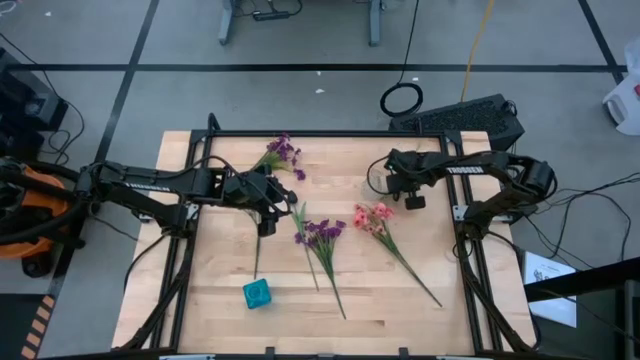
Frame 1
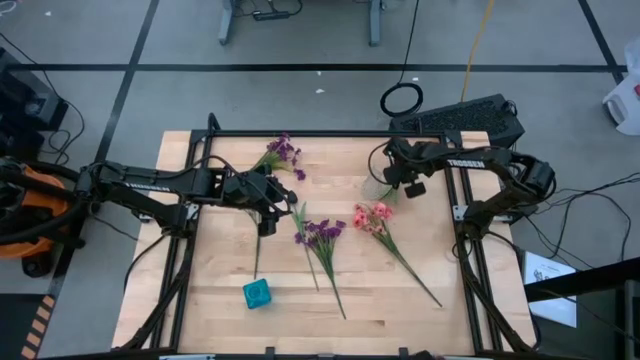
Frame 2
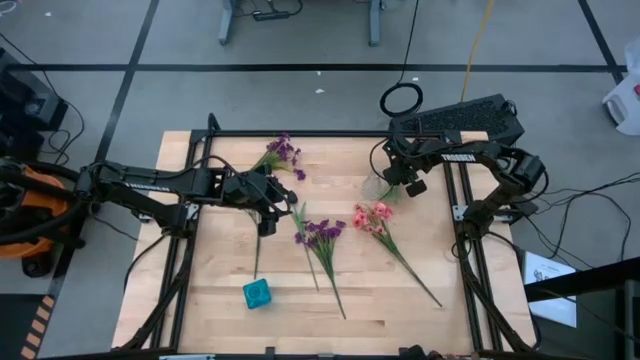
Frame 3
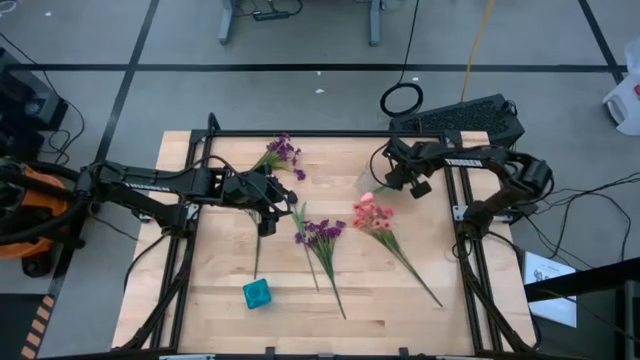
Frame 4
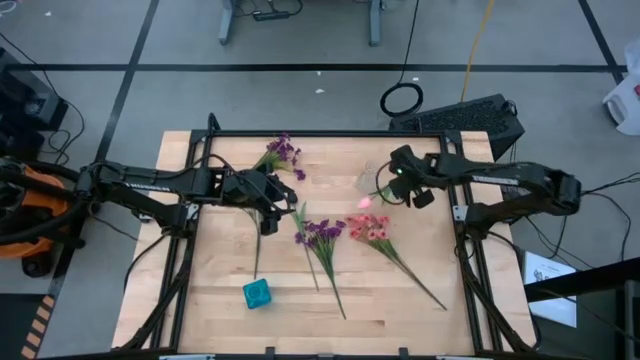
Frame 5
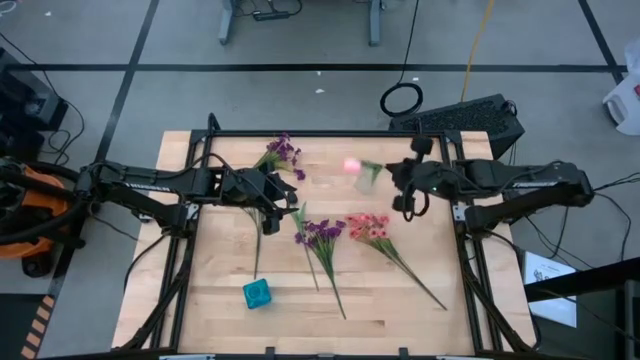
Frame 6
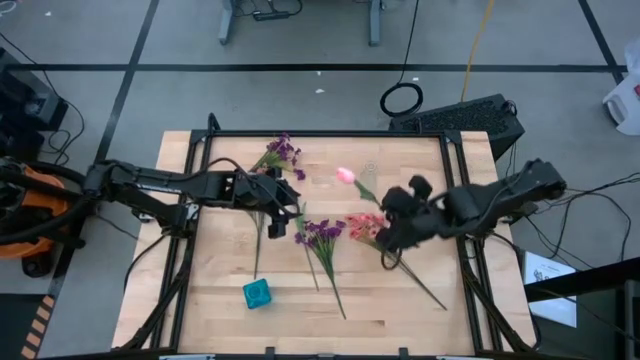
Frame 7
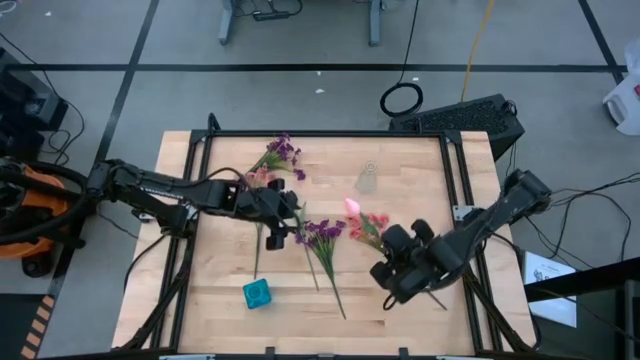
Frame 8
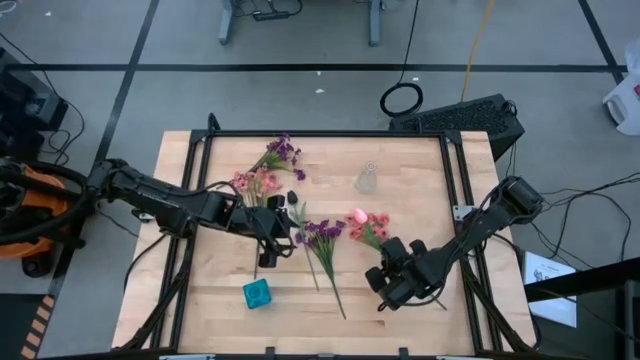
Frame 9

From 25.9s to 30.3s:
Task: Sort flowers into vase by color
Move the pink tulip to the middle right of the table

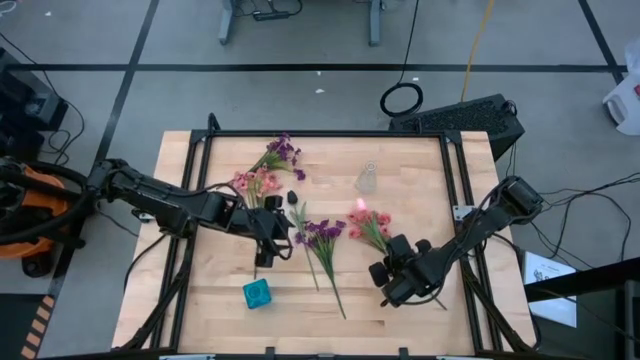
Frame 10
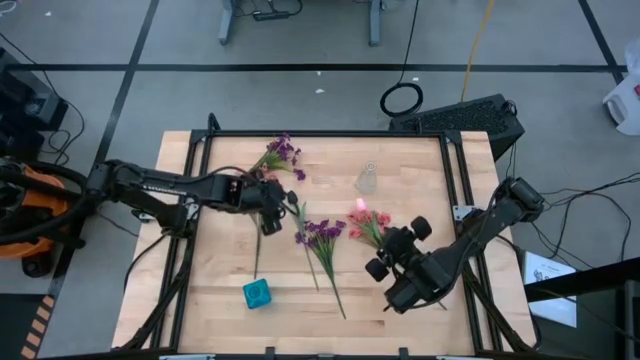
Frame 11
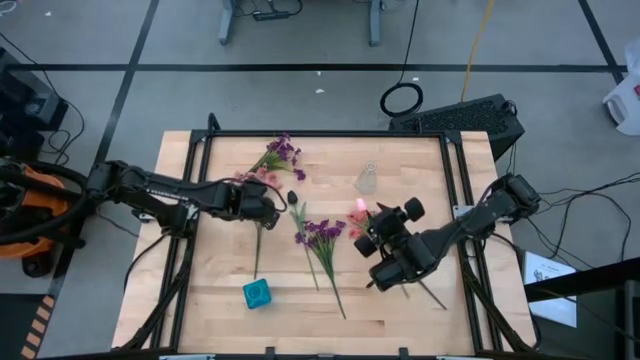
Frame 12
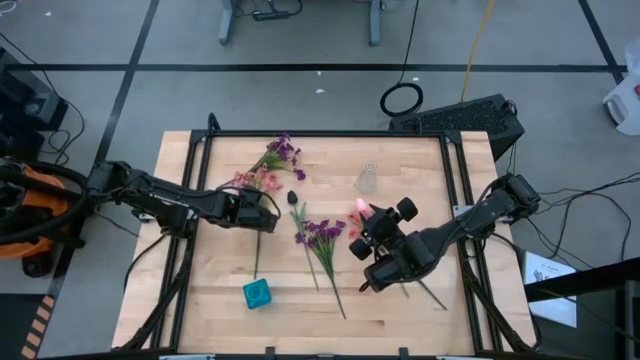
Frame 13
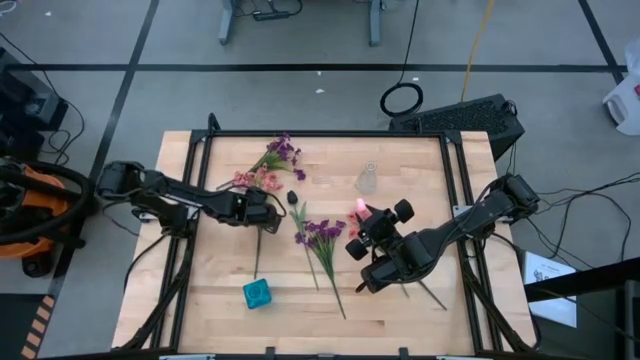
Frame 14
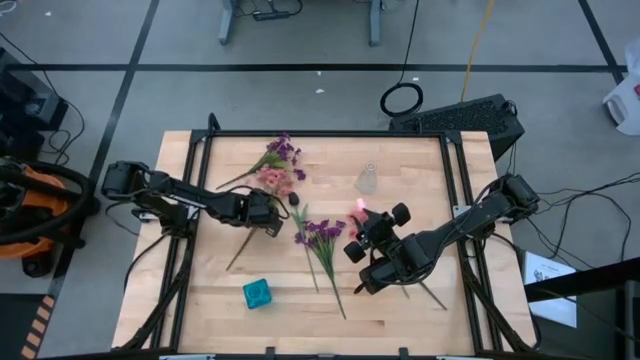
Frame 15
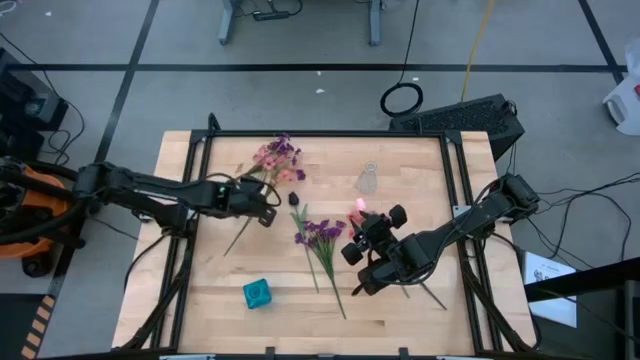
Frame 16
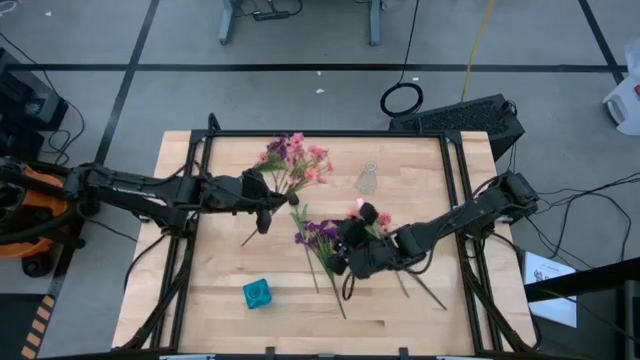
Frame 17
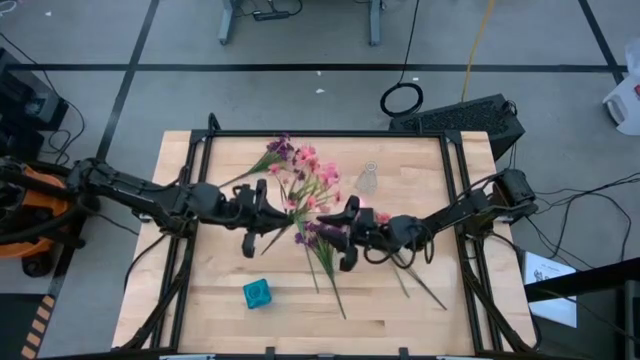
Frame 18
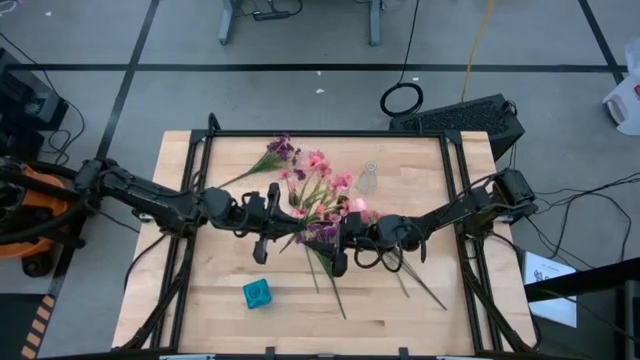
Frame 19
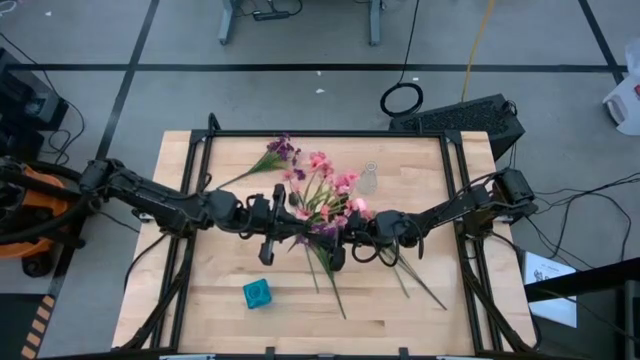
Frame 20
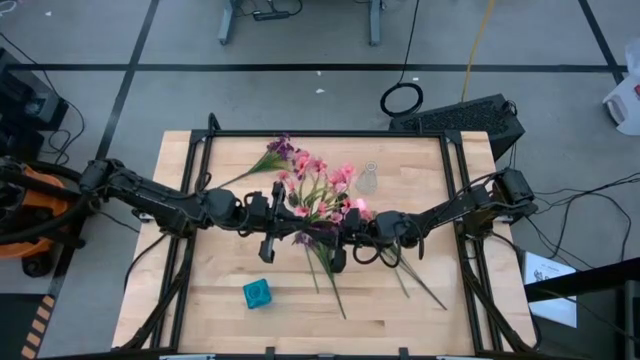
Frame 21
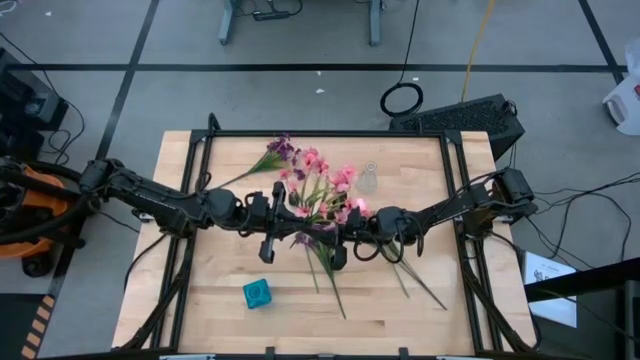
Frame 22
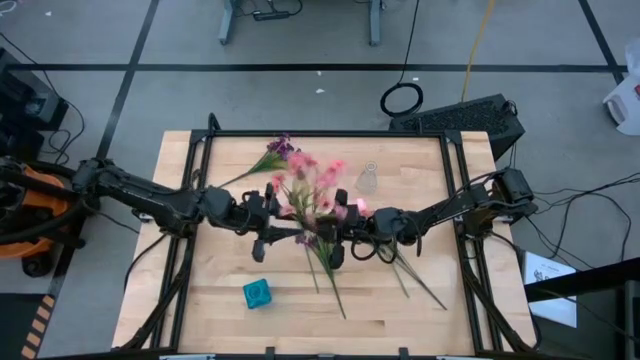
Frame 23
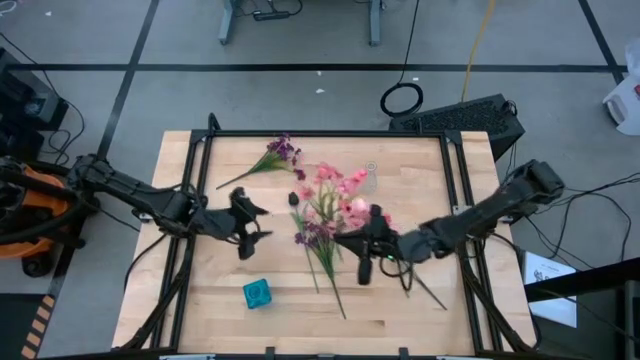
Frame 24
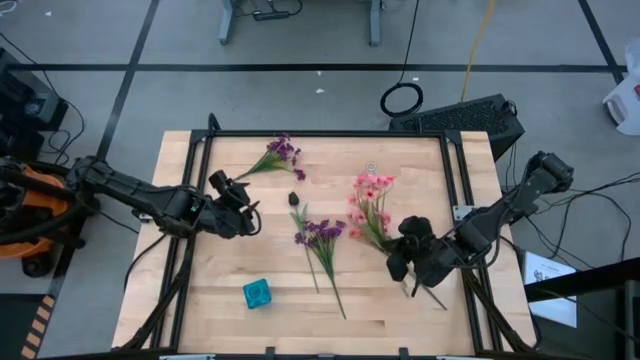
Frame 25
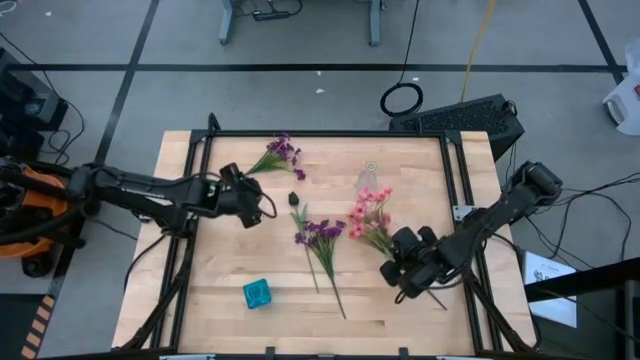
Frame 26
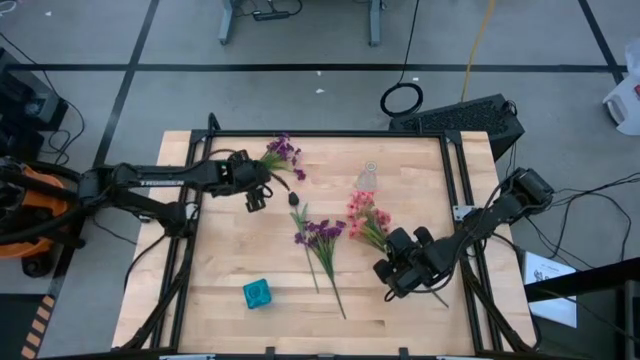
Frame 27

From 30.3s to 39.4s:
Move the left pink flower to the middle right of the table

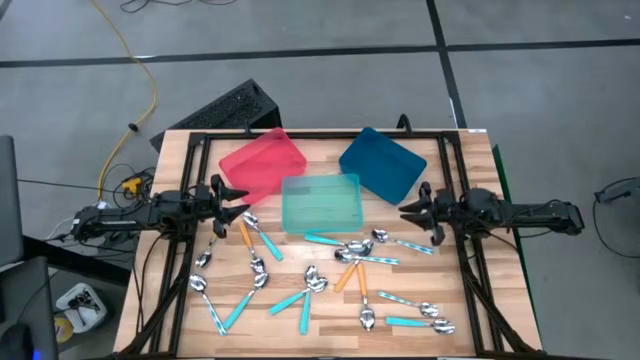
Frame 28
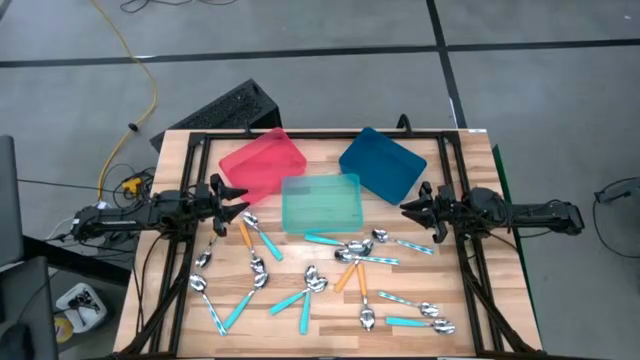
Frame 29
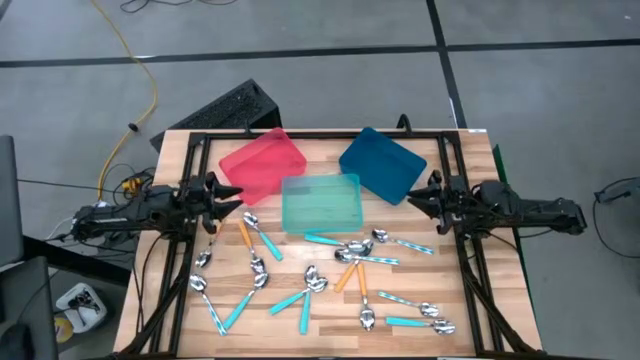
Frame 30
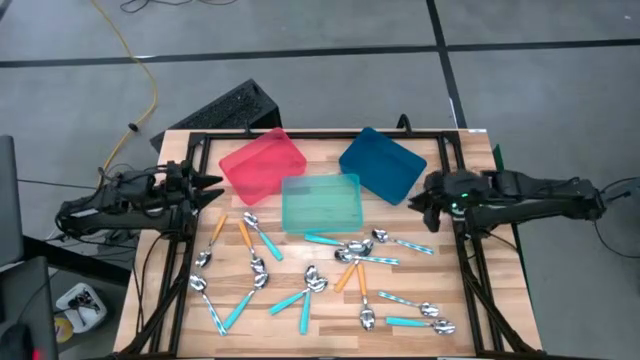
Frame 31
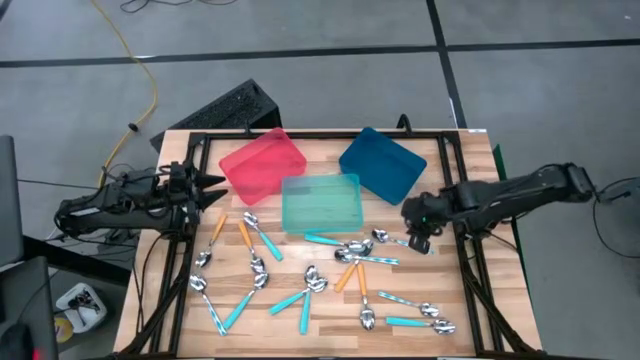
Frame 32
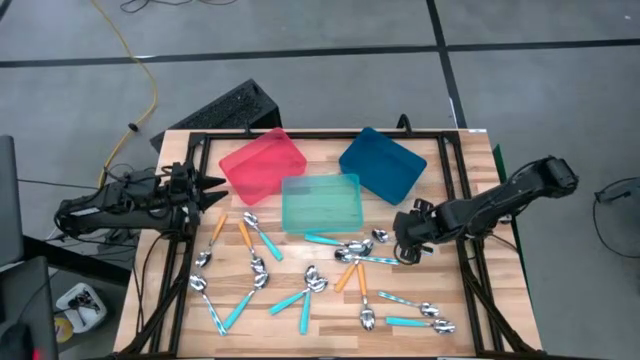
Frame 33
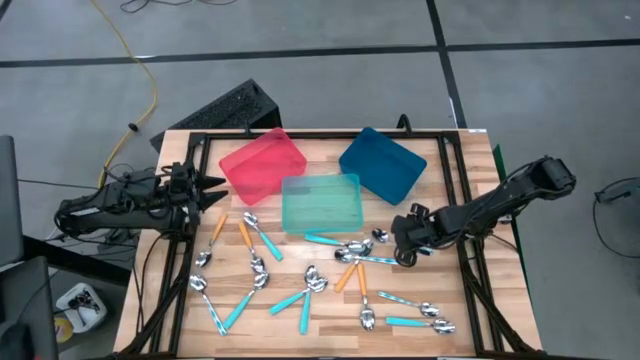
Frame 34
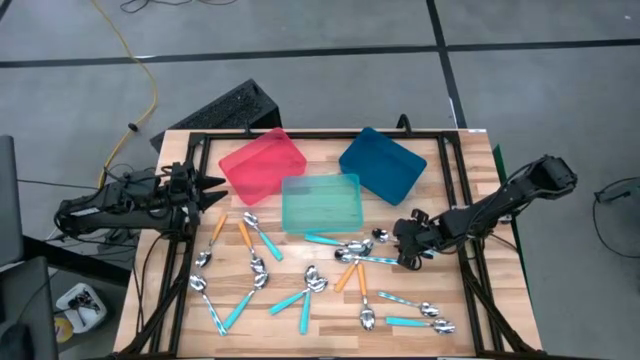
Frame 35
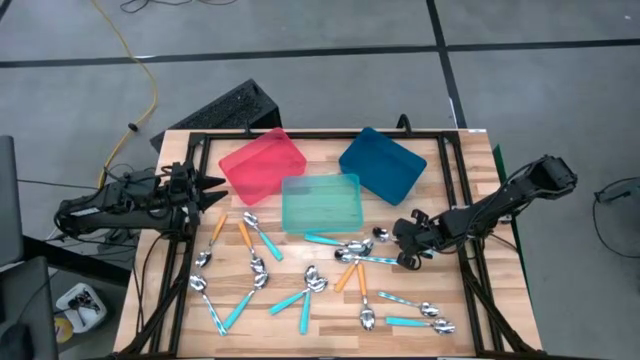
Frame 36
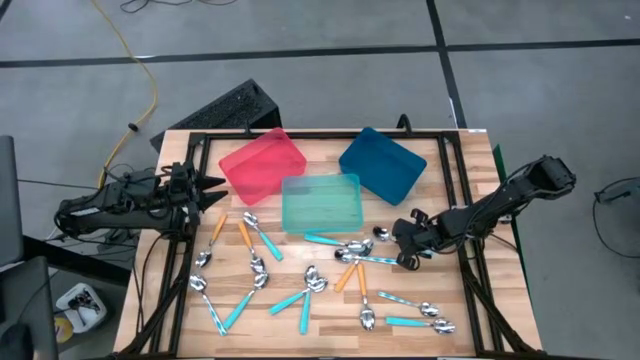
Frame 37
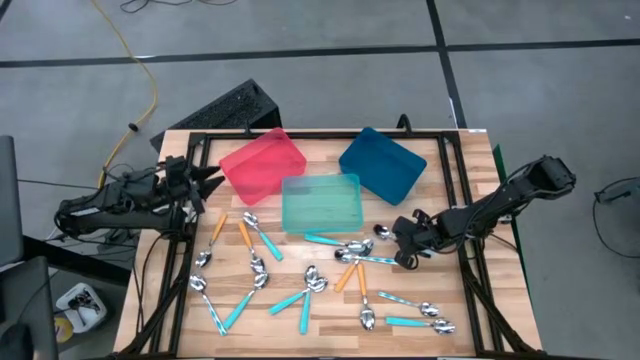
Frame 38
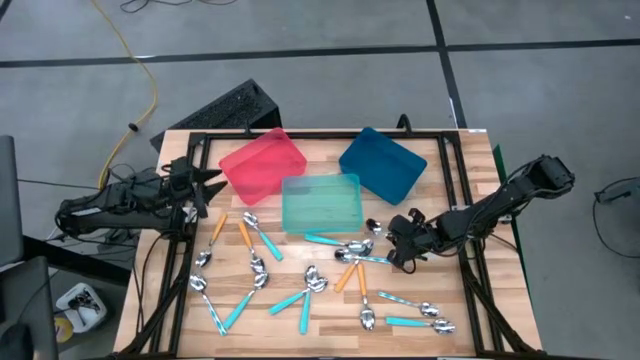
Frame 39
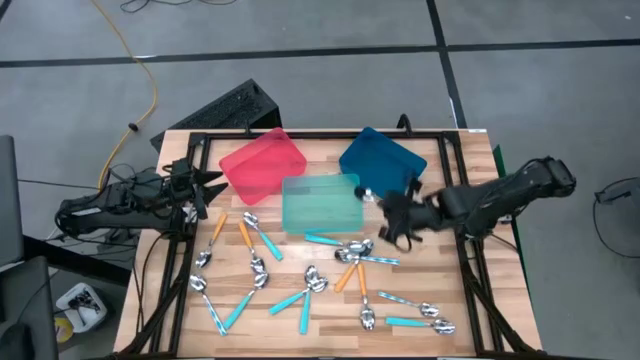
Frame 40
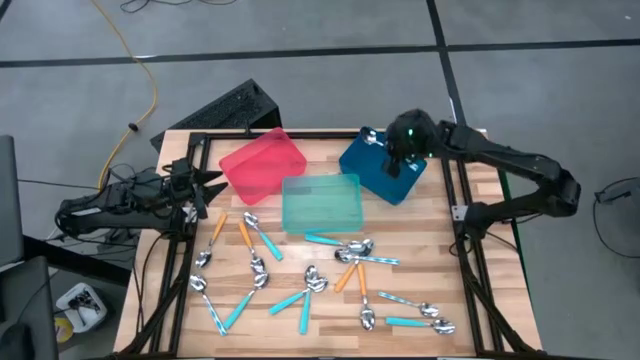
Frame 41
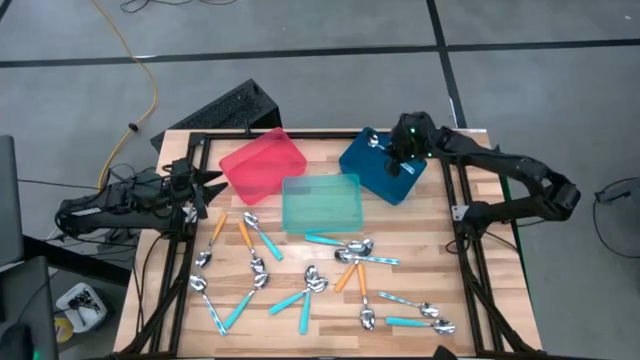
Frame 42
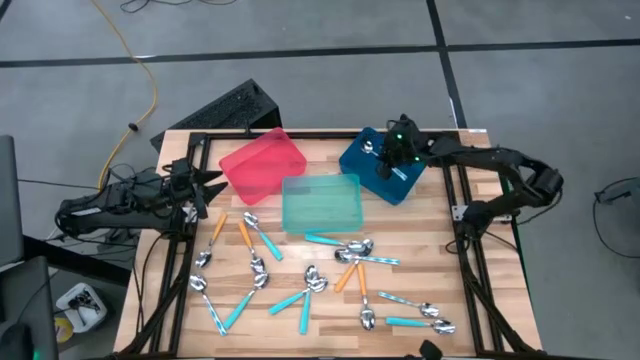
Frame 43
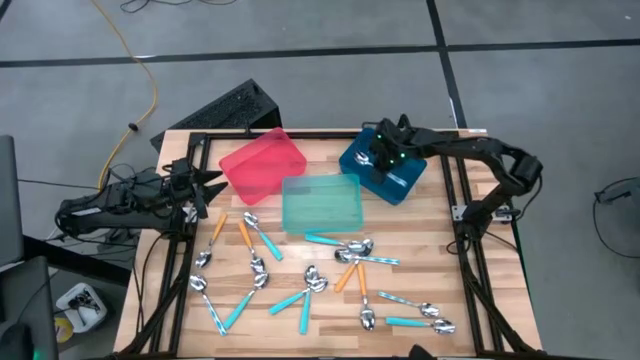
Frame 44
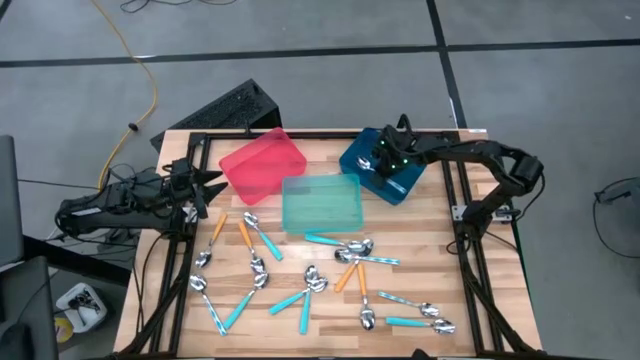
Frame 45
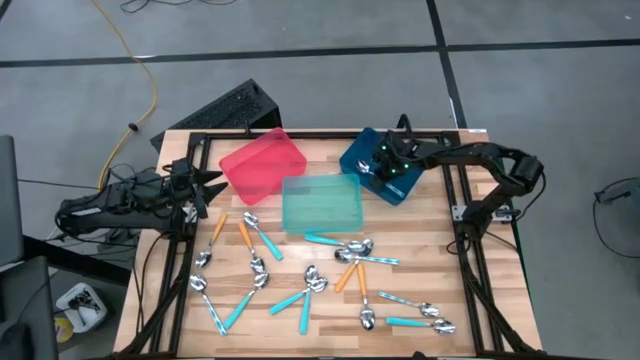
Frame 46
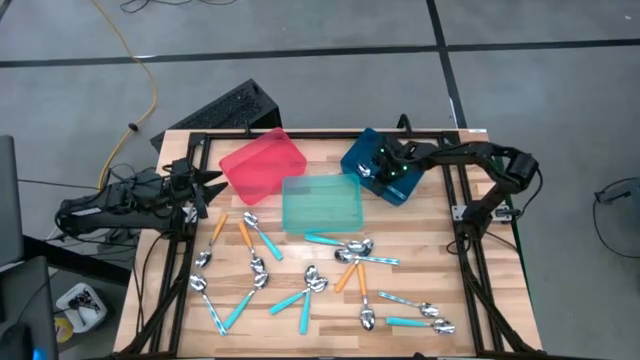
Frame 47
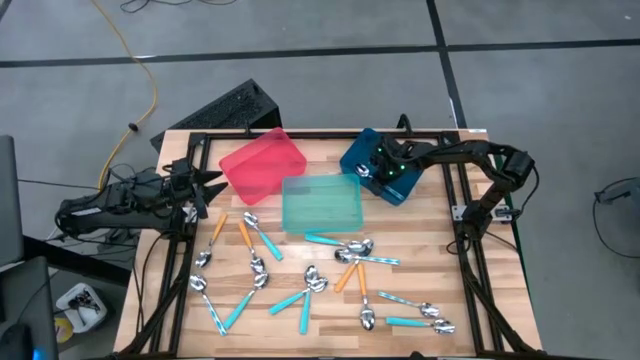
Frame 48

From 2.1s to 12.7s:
Task: Sort silverware by color (type)
Put the patterned blue spoon into the blue bin
